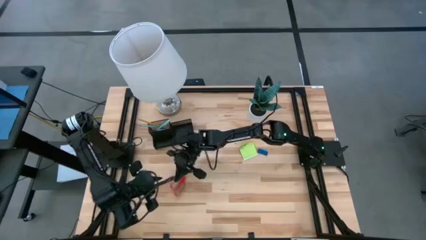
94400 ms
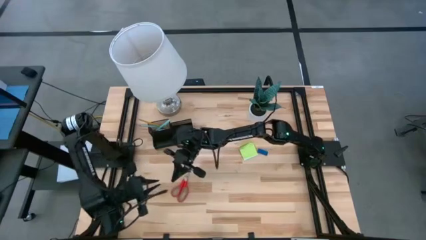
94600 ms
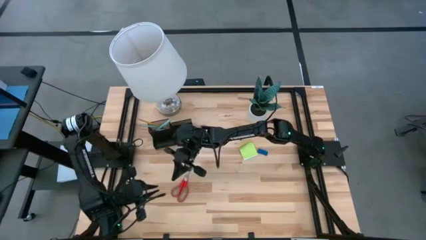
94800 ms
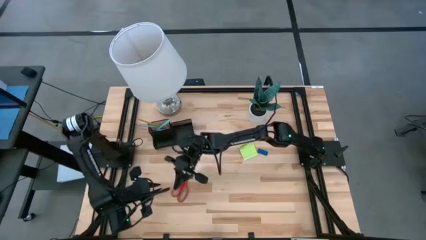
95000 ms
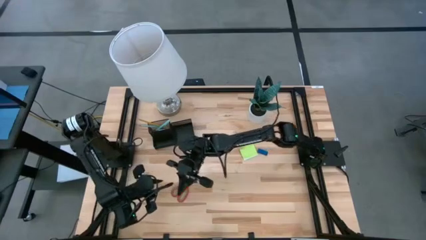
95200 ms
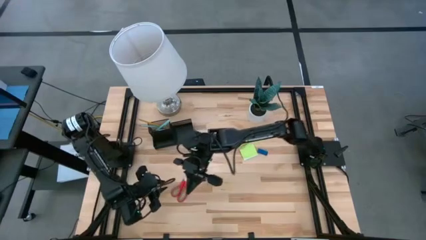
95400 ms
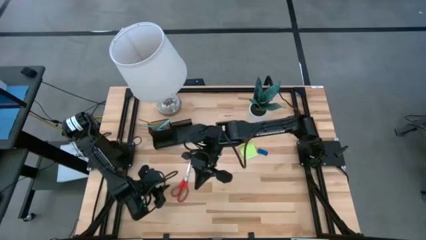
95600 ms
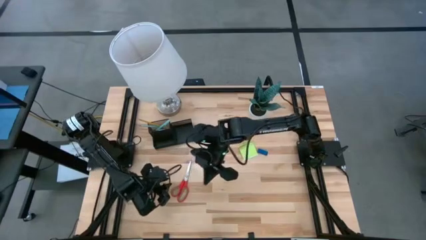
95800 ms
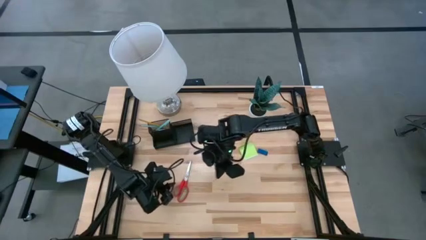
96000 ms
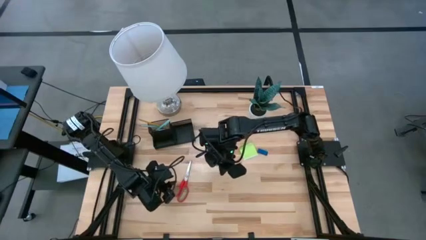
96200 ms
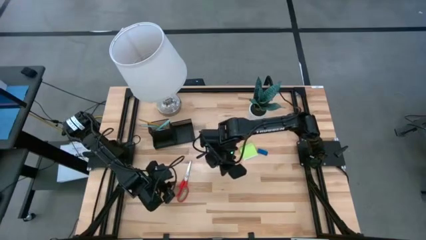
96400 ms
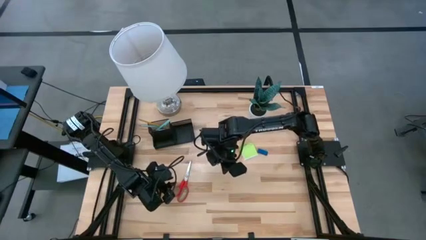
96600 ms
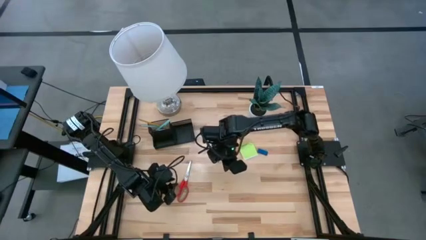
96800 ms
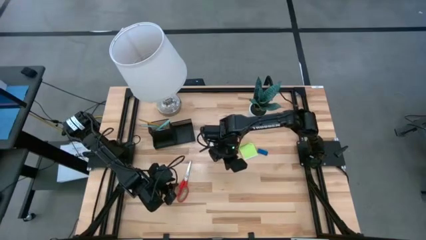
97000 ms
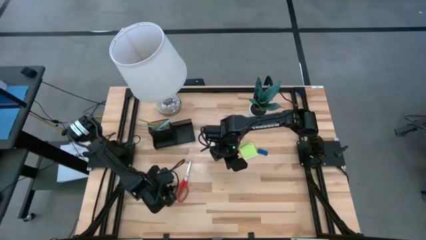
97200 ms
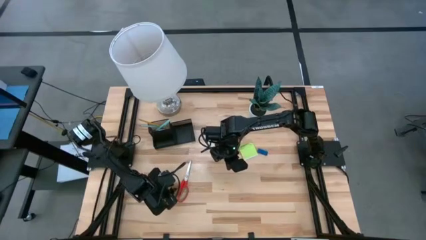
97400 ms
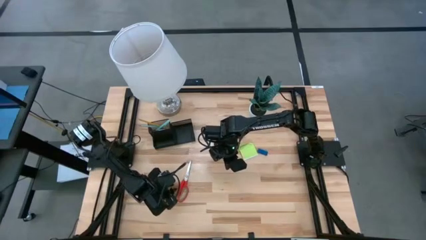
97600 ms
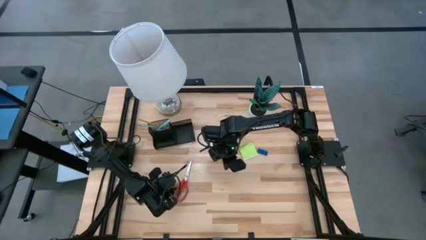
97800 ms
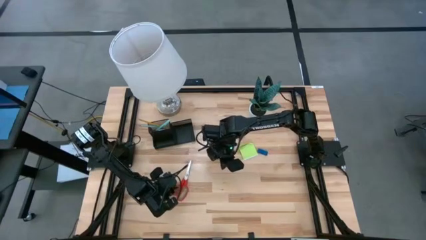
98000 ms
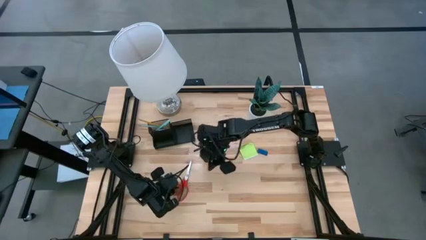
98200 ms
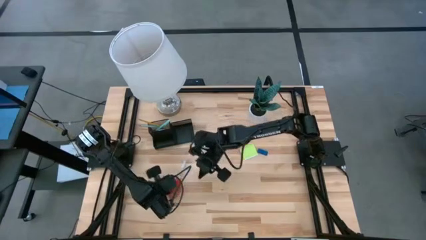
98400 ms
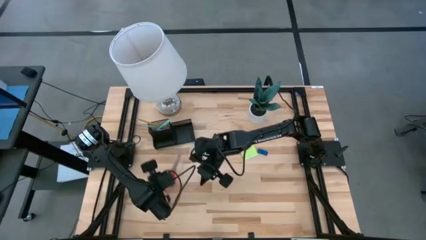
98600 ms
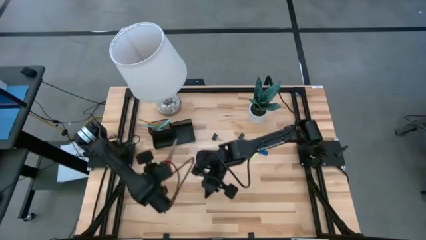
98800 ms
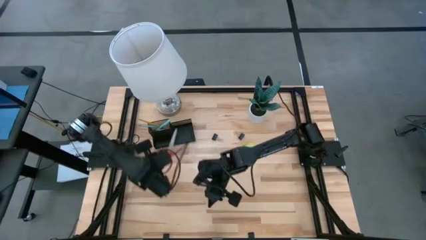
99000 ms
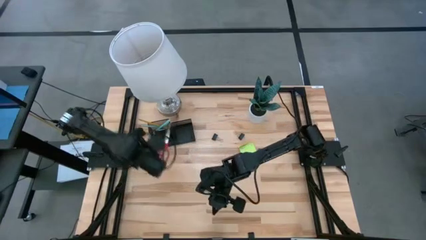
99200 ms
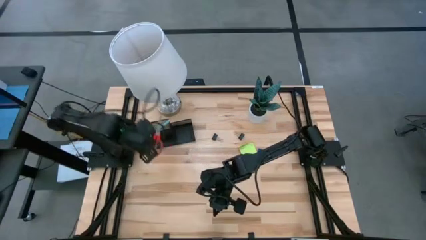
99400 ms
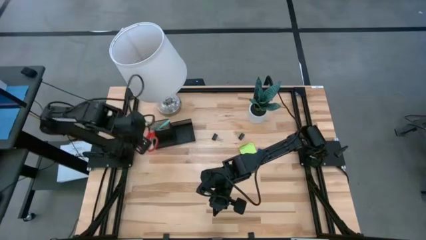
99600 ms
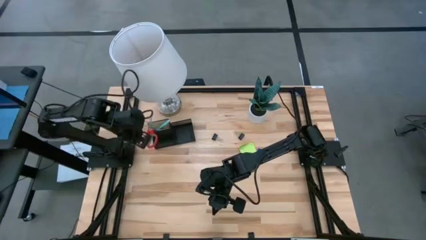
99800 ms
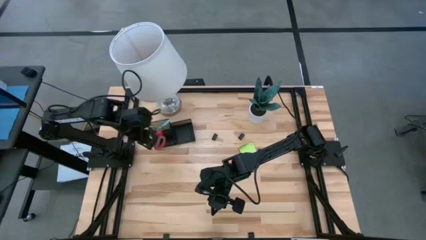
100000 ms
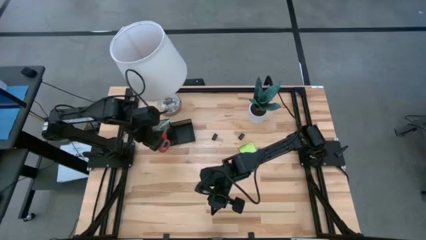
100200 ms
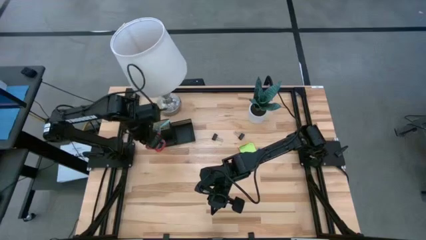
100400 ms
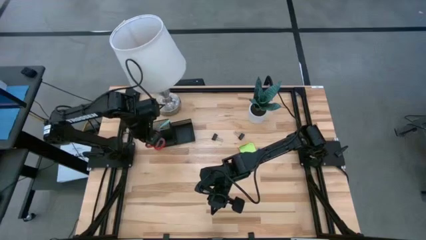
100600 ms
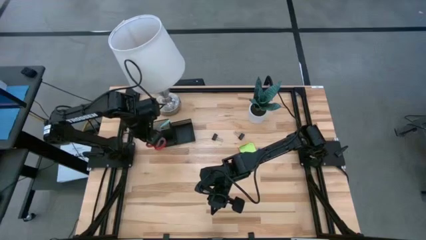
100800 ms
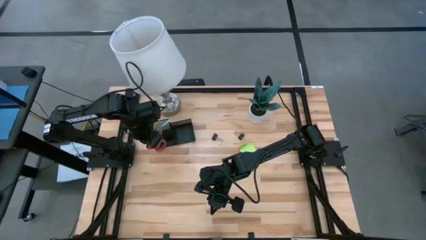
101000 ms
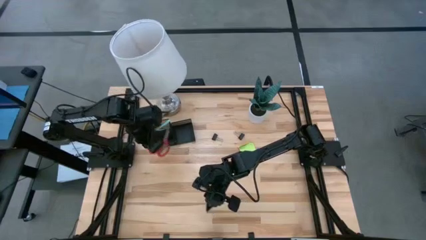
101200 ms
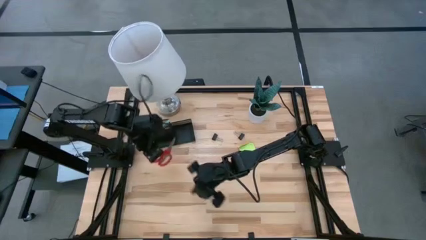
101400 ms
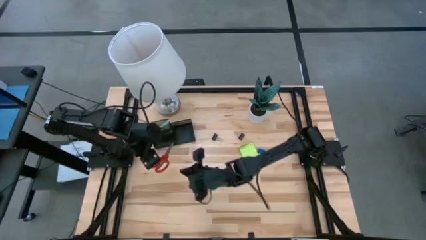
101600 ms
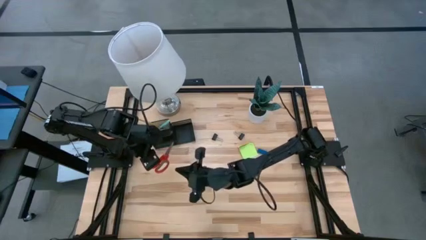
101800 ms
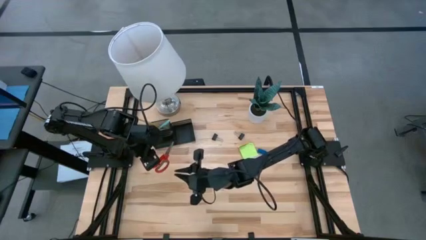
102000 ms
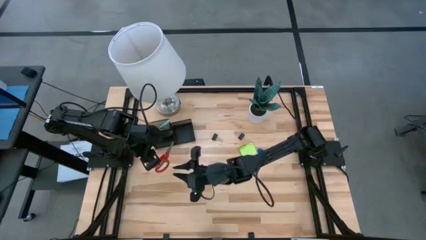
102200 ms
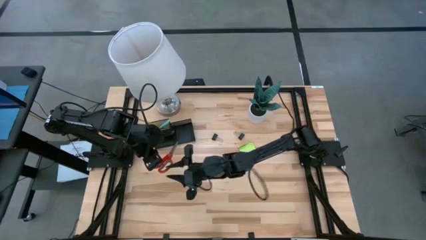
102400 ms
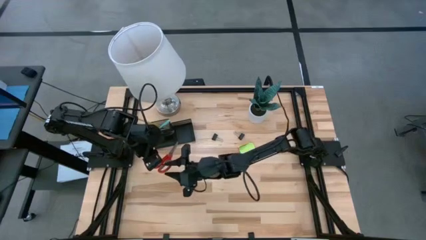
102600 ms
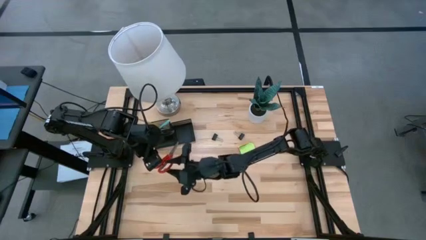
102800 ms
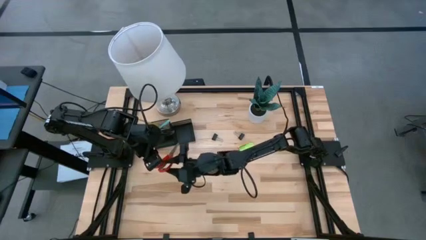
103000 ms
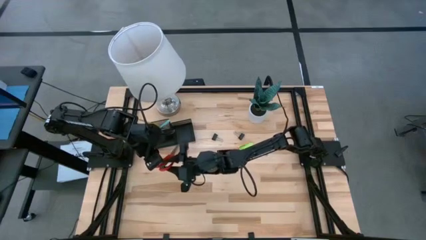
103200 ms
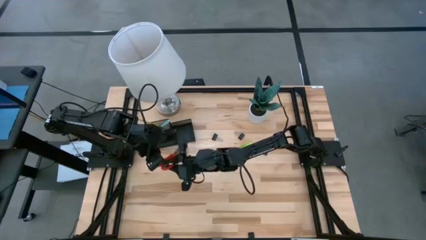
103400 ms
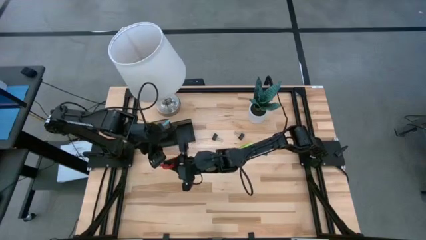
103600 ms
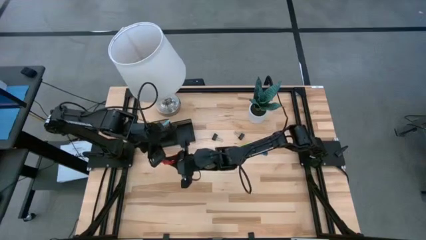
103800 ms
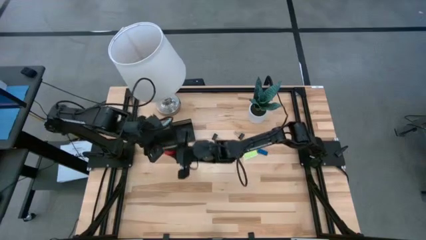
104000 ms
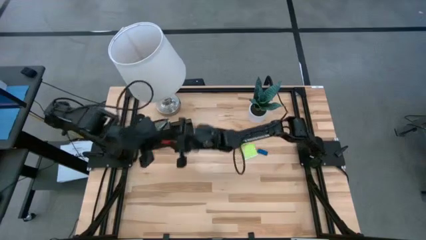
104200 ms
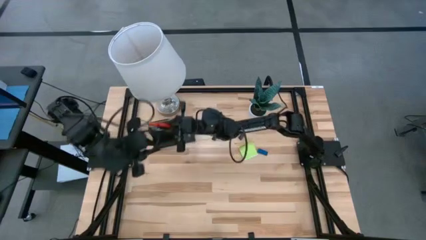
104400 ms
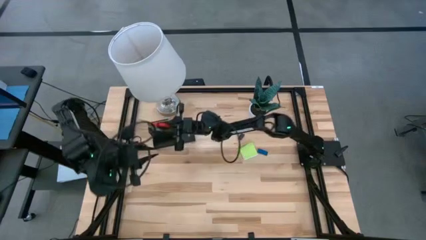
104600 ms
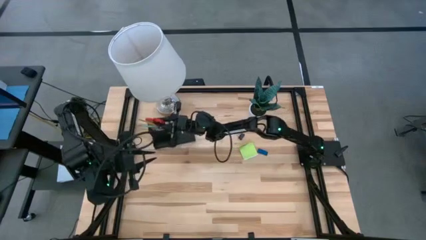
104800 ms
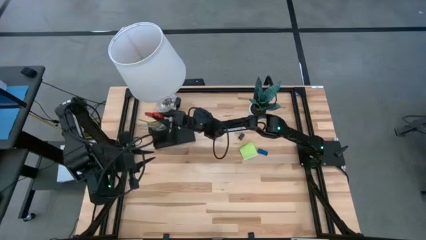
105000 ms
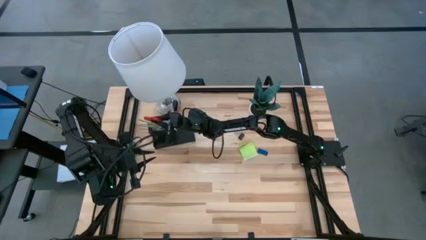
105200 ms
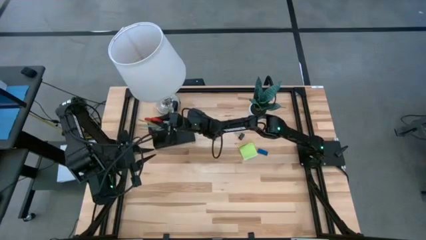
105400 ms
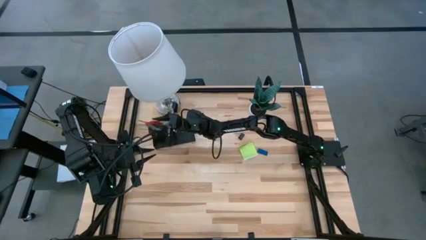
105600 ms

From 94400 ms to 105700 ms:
Task: Pick and place office supplies into organizer
Put the red scissors into the black desk organizer

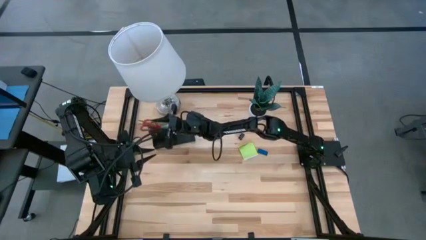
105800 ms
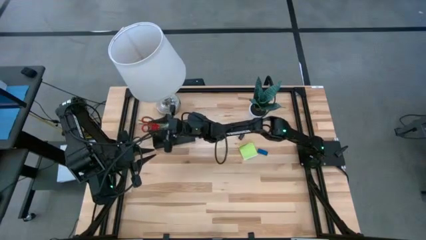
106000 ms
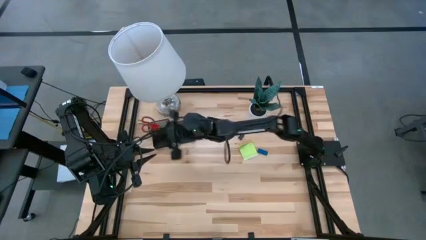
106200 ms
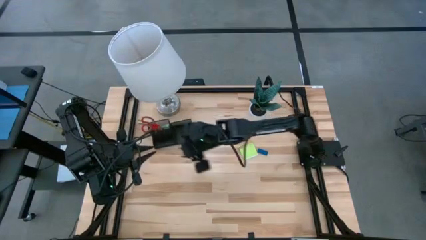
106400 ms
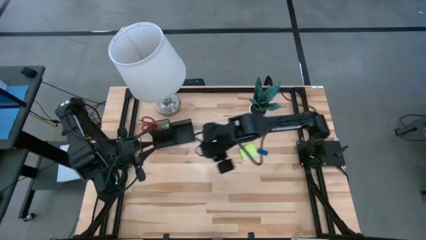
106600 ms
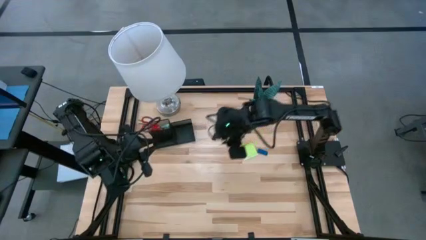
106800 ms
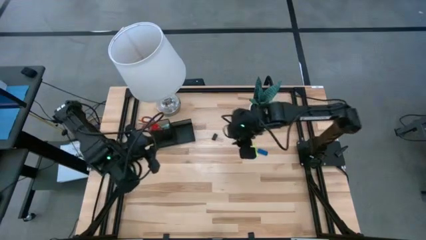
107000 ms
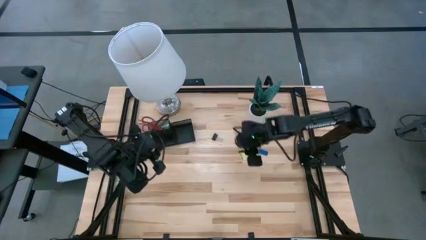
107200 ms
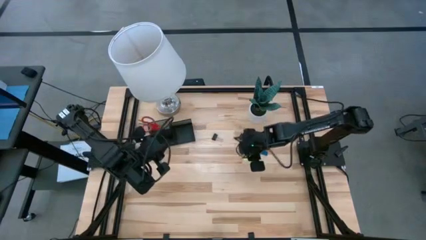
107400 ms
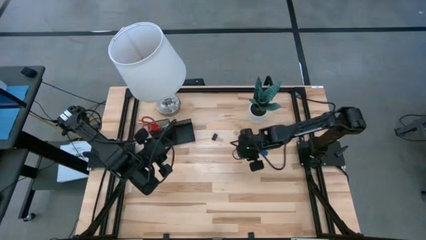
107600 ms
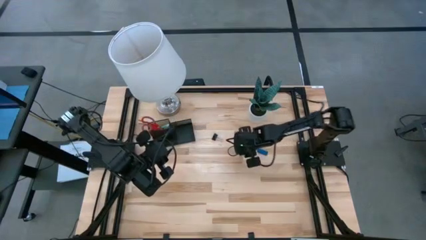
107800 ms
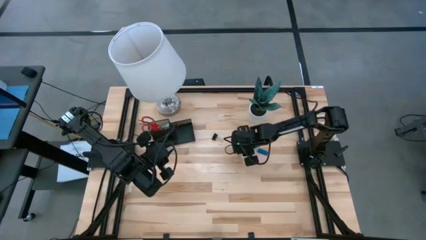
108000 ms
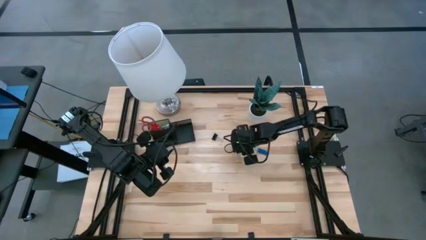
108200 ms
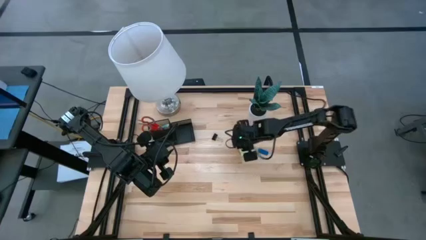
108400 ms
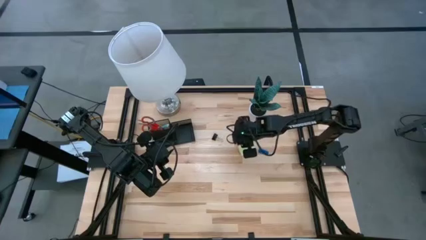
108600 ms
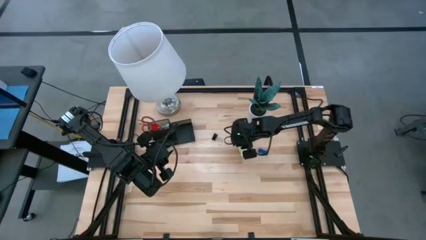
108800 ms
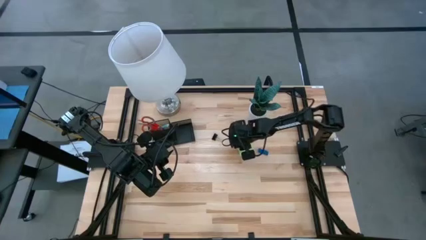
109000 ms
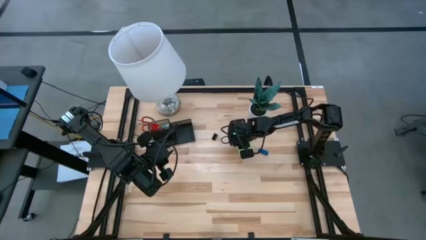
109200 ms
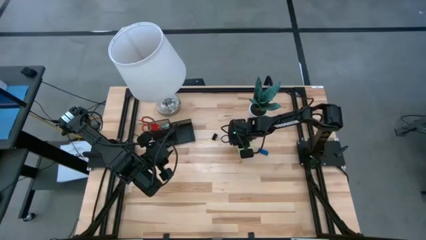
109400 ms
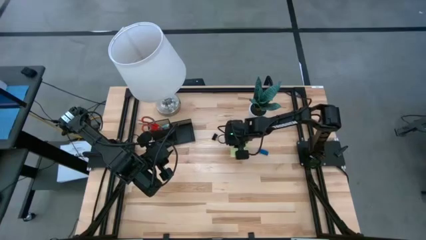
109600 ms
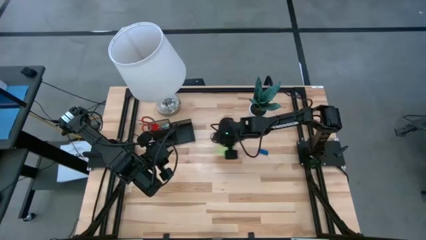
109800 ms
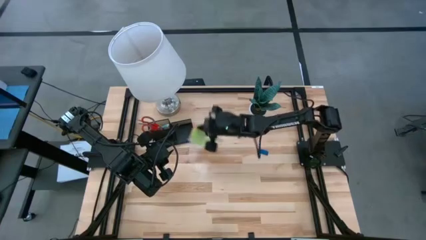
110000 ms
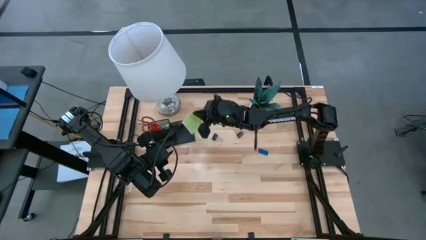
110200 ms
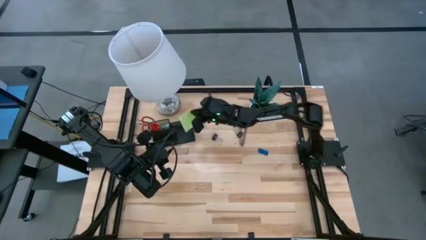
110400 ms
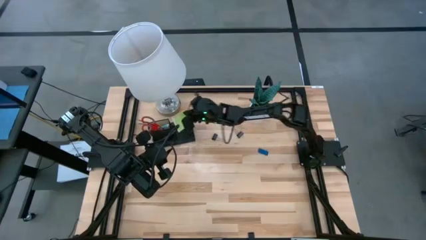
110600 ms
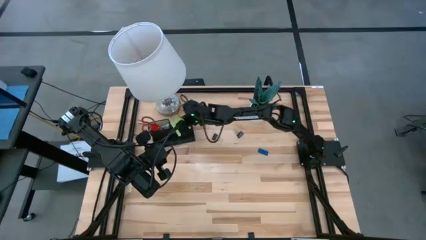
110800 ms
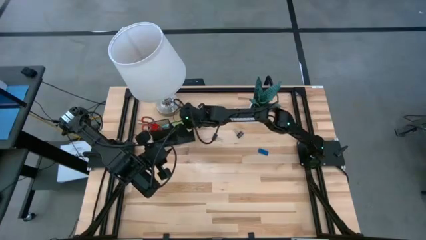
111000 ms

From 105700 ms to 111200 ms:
Put the green sticky notes into the black desk organizer

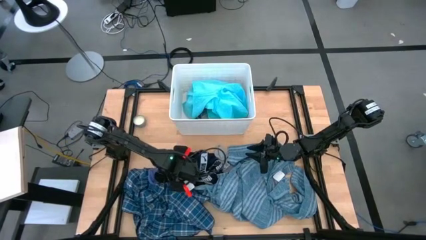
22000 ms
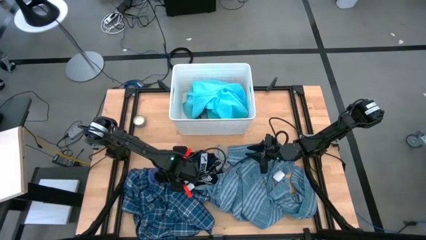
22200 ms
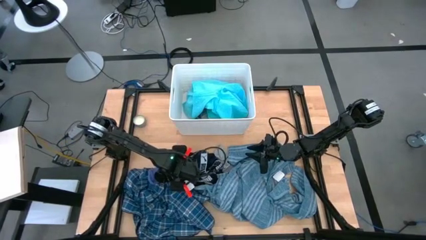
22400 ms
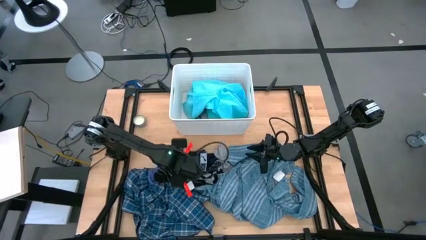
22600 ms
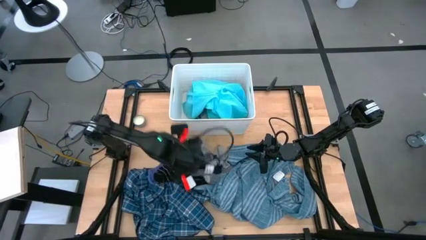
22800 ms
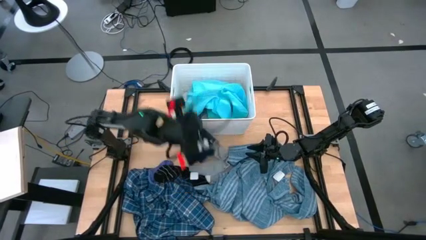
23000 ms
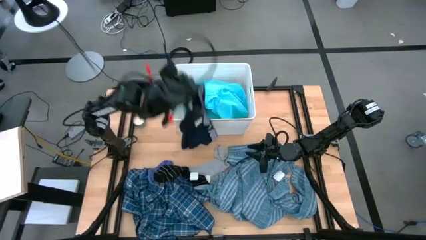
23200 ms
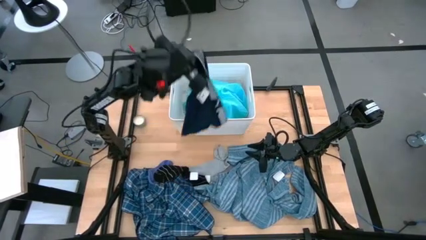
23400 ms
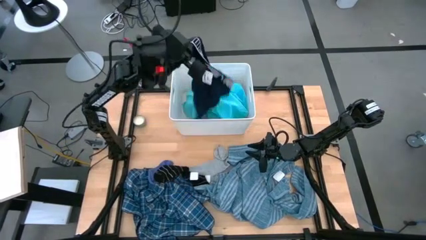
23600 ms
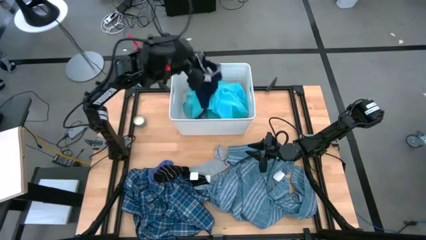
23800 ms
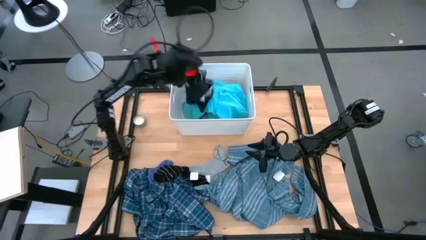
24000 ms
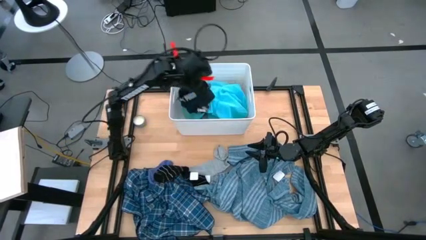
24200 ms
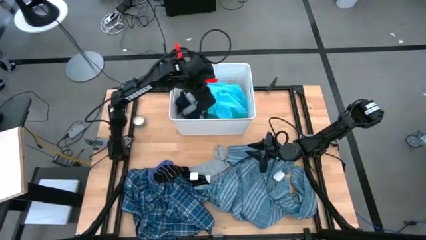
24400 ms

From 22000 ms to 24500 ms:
Task: Sort clothes
Put the black boxer into the white bin
